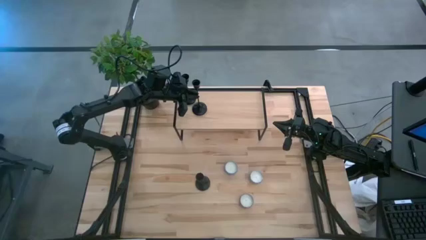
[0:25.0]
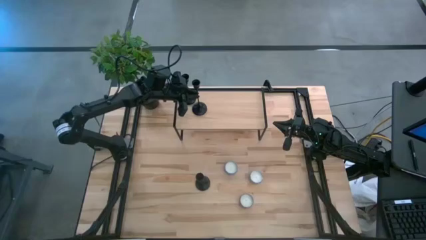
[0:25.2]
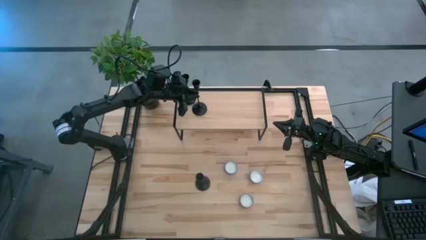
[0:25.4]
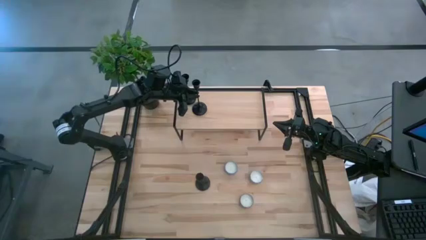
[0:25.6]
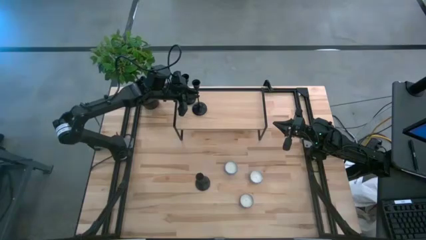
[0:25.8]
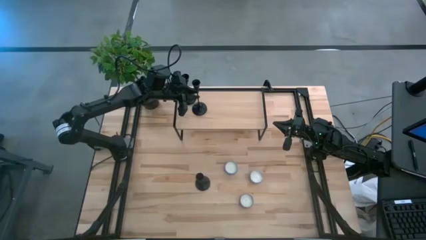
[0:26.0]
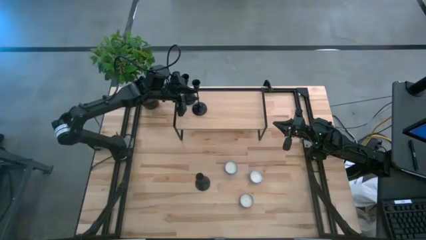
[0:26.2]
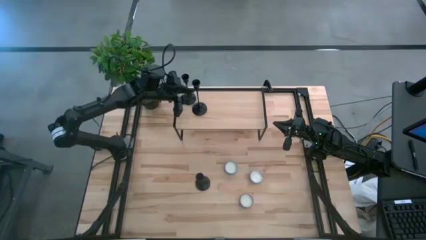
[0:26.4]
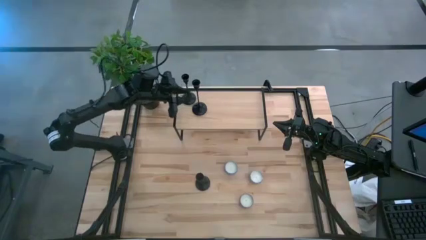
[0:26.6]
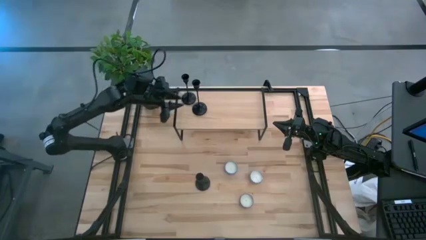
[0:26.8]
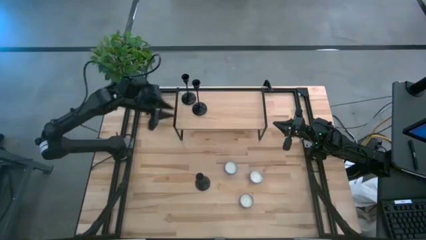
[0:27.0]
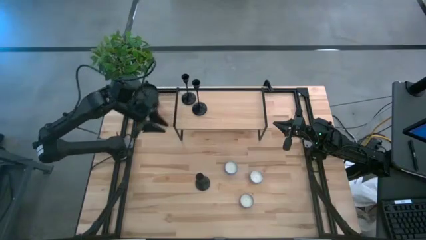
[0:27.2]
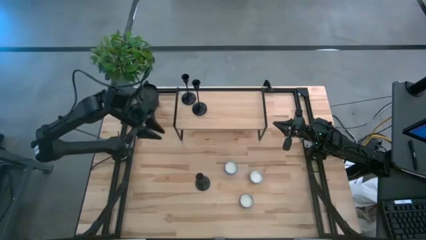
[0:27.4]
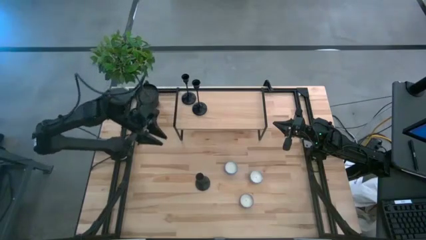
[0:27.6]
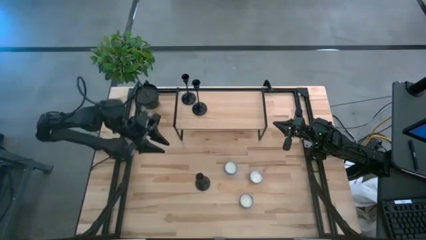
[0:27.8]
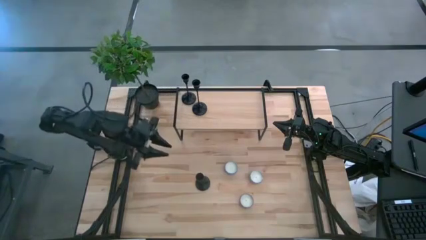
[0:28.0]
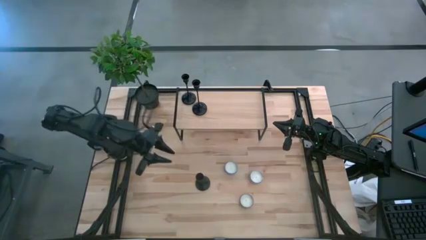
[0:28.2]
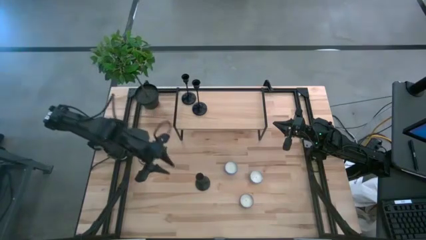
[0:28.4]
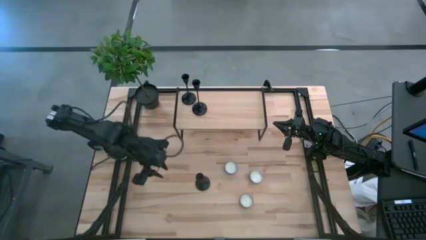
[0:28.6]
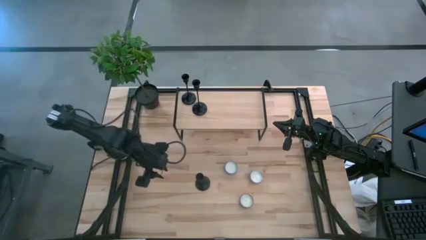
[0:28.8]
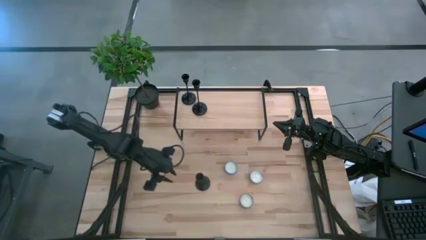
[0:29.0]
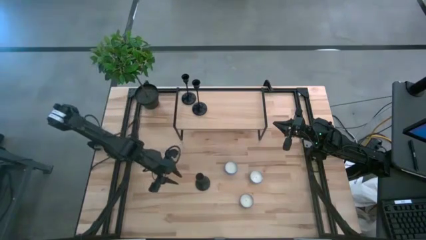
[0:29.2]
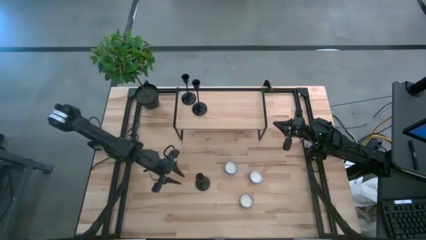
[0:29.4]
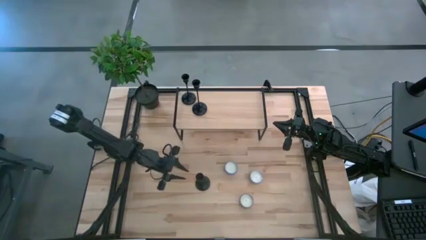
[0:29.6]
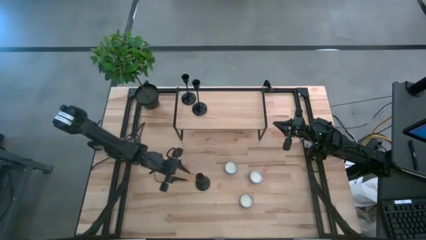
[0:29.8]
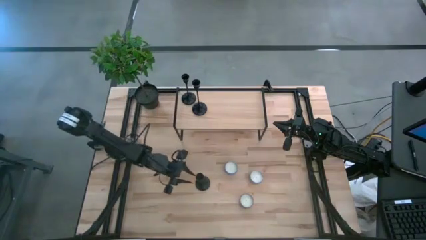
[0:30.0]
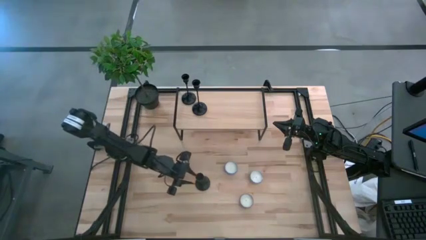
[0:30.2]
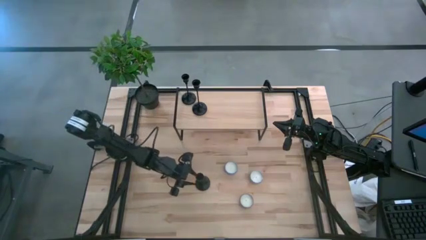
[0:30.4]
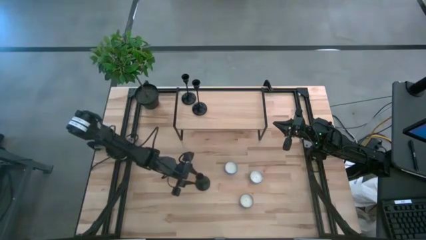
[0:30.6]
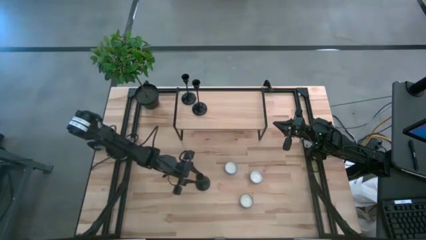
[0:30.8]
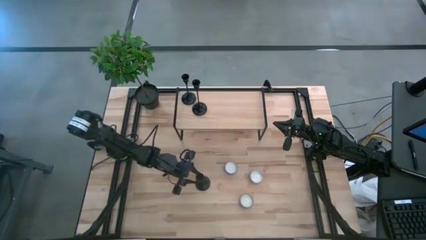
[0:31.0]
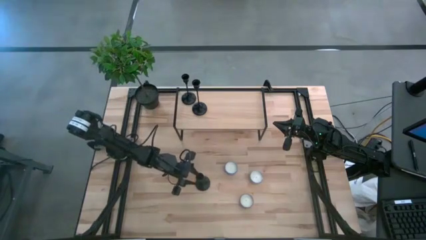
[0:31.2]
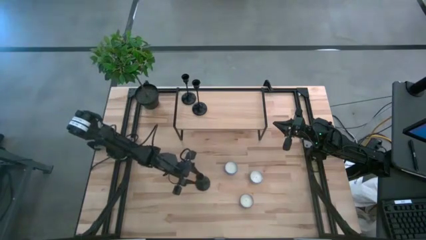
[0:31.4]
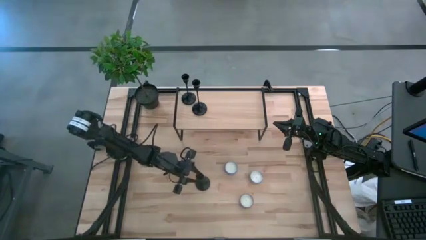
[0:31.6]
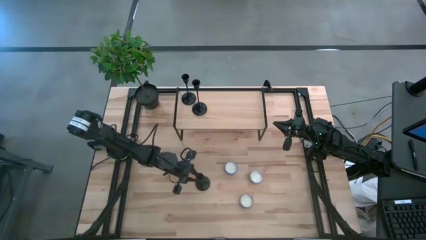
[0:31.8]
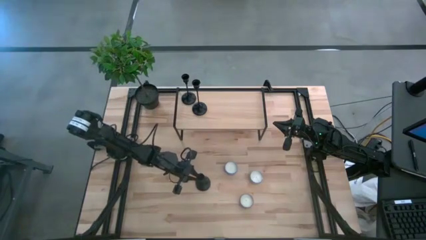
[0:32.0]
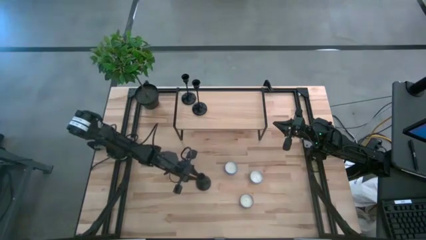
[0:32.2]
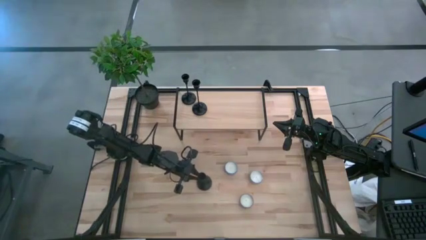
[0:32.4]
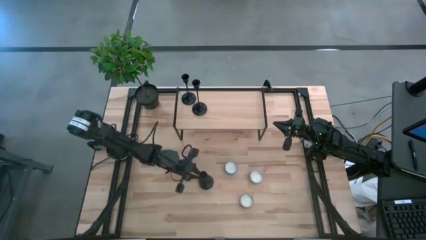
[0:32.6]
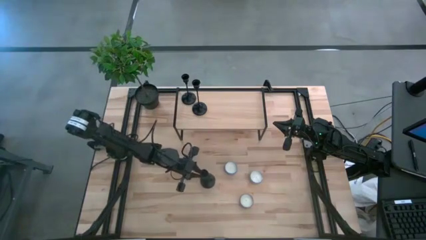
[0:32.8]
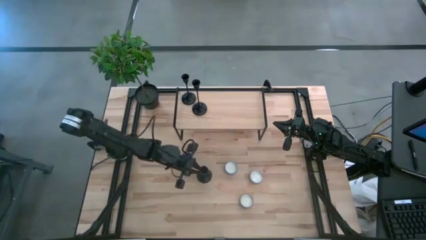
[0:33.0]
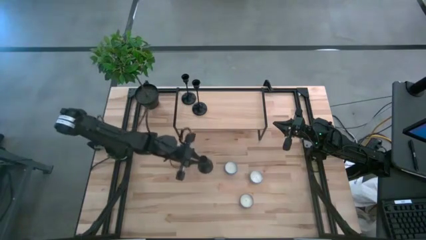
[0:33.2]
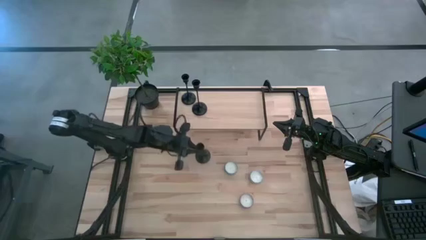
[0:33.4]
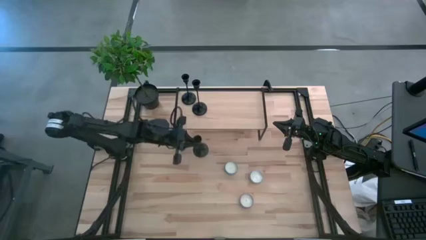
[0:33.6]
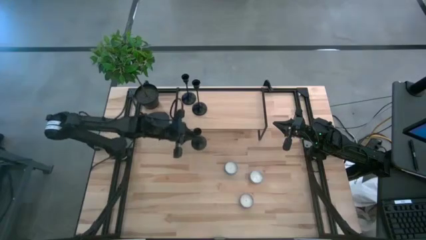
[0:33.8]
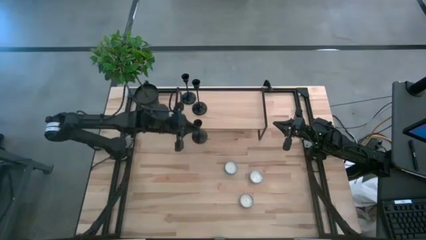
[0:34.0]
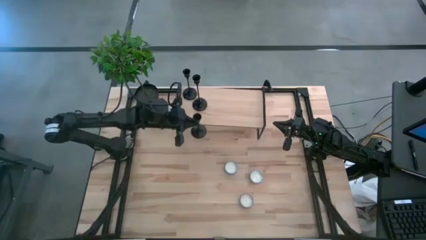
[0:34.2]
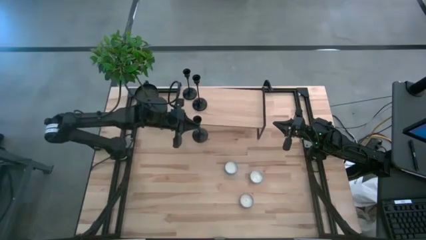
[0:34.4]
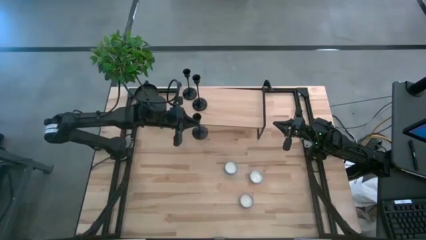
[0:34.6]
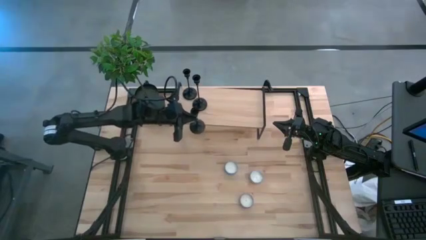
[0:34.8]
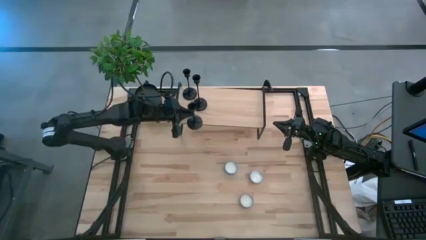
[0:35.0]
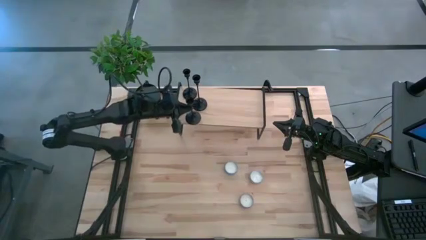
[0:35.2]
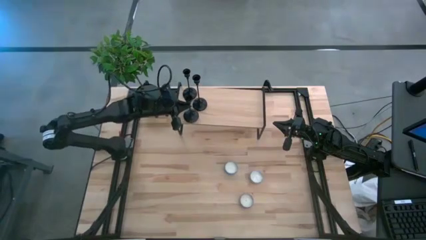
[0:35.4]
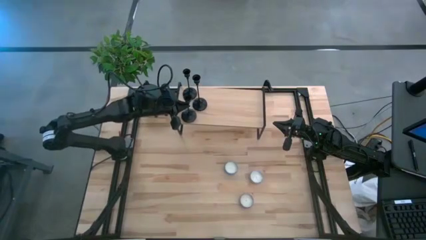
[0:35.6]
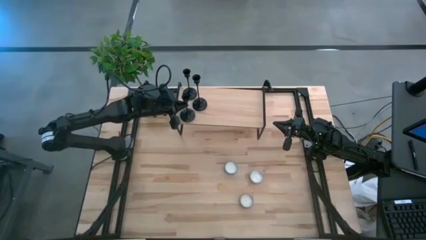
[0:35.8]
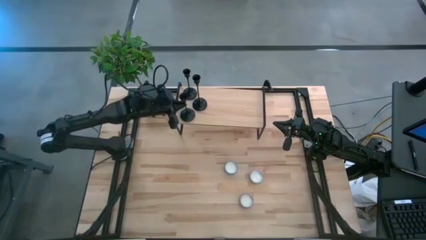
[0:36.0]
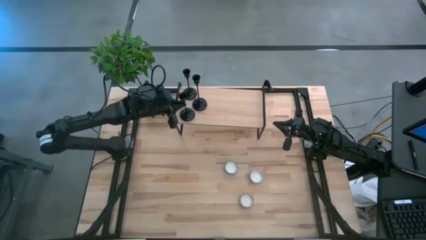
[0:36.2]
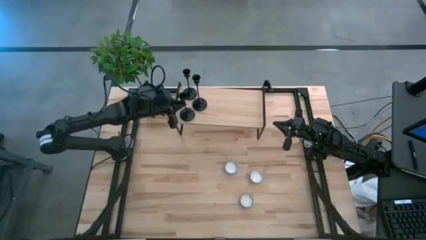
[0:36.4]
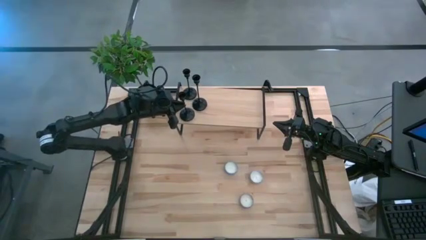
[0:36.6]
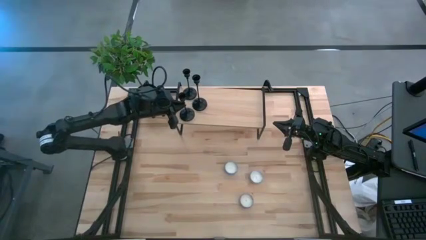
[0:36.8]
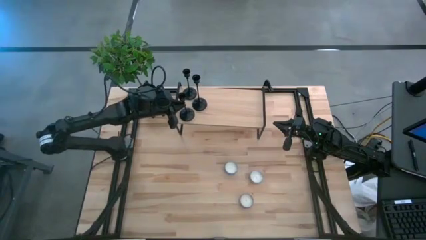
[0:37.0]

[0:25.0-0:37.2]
Task: Pick & Place candle stick holders
Put the black candle holder on the shelf

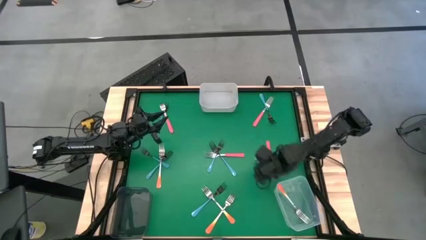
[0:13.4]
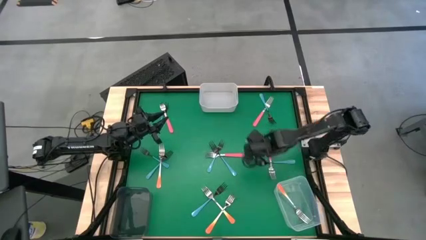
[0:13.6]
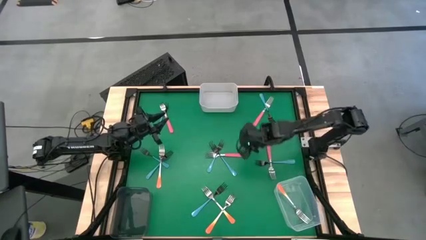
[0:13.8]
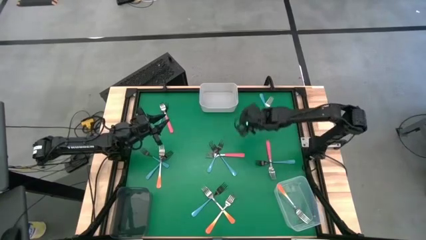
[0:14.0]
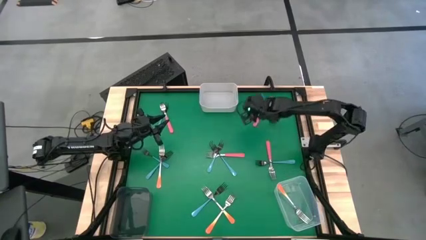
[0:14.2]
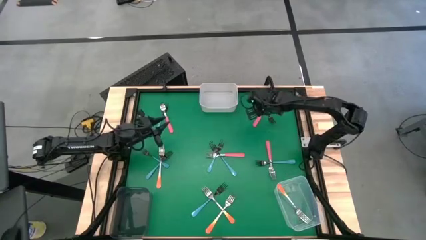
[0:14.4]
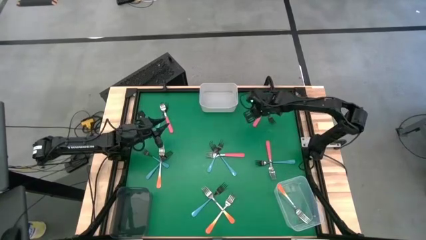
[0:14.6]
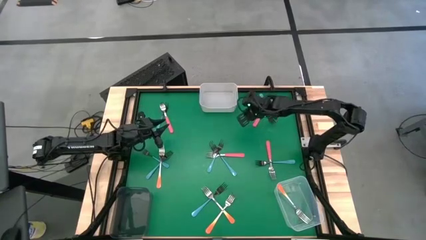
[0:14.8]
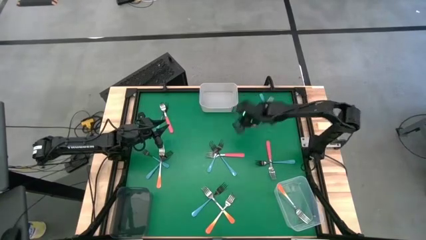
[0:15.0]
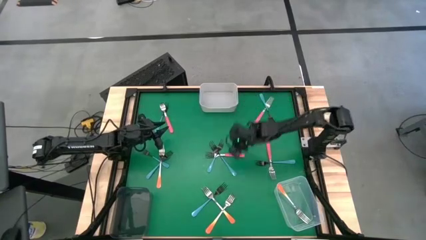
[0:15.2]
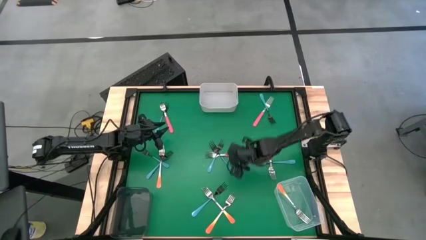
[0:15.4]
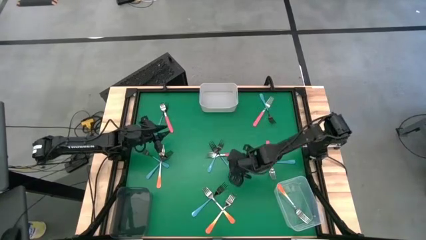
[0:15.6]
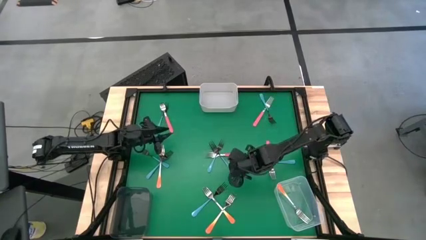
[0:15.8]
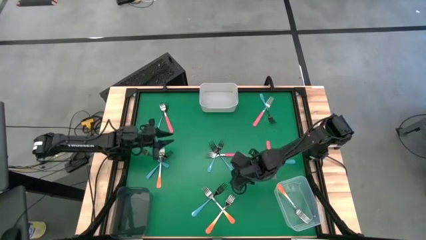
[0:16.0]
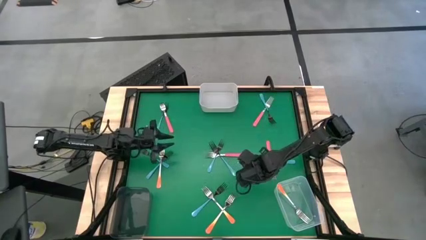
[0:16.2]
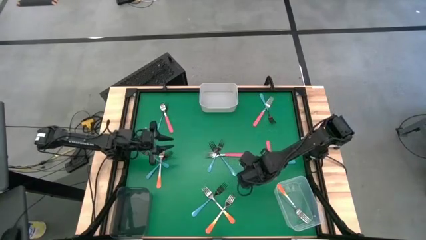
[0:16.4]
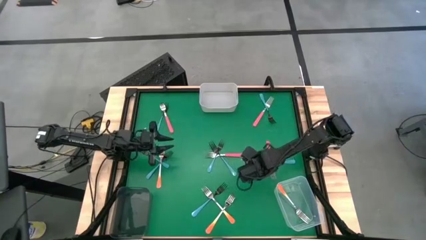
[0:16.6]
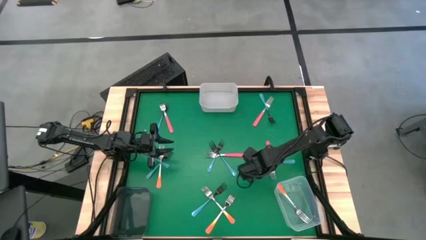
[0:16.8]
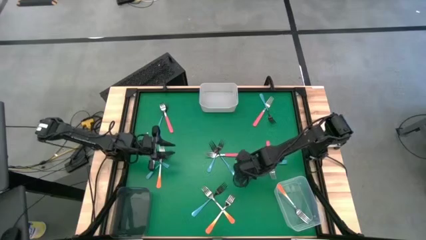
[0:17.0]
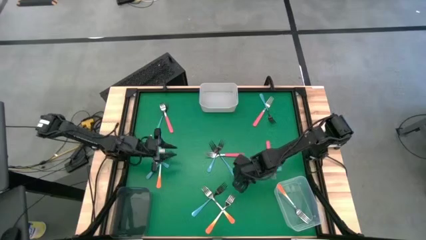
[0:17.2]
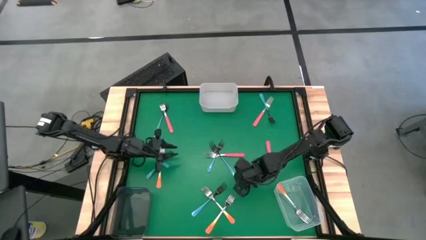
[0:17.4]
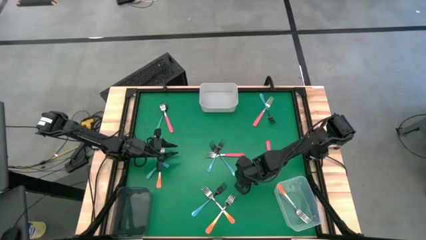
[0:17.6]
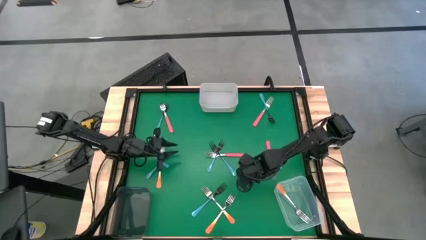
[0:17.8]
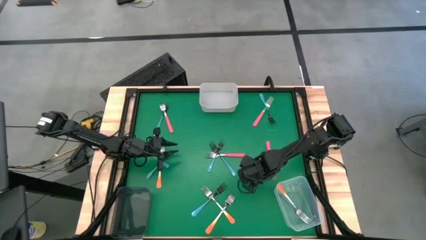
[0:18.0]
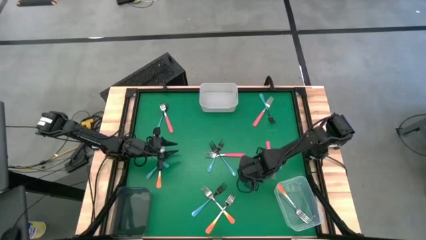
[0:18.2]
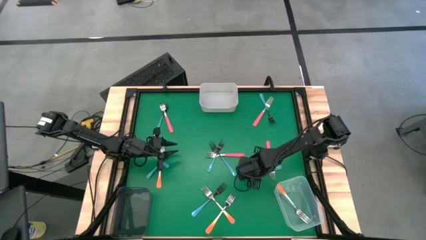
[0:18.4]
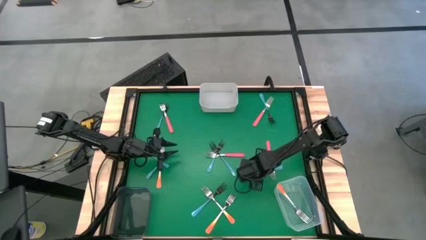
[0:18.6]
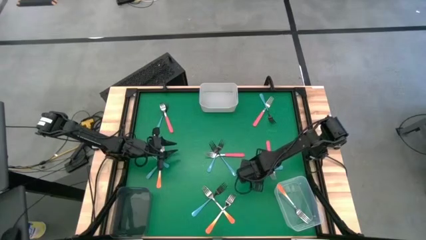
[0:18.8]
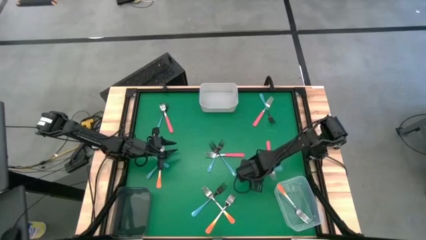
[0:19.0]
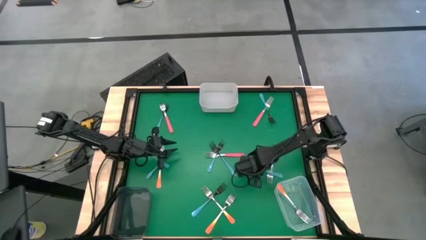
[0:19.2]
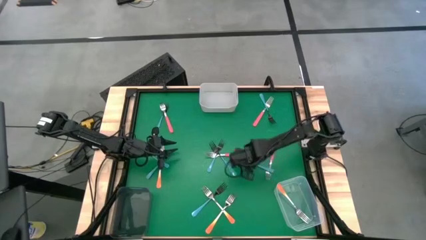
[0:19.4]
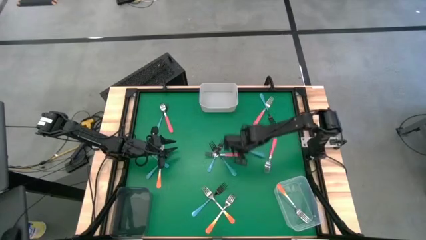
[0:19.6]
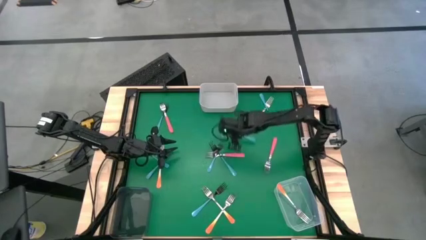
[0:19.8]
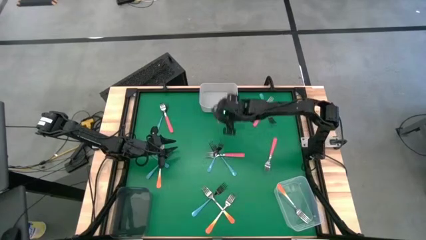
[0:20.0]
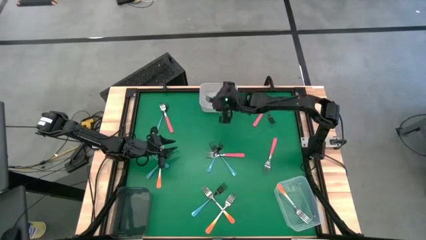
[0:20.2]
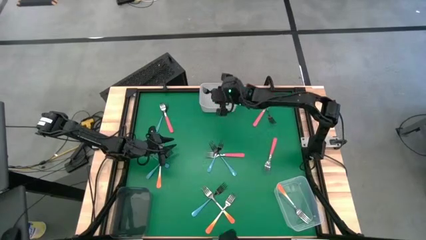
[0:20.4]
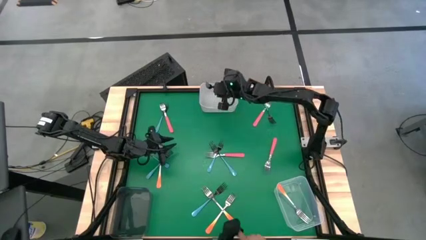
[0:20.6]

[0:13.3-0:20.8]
Task: Sort silverware by color (type)
Put the blue fork into the white bin
